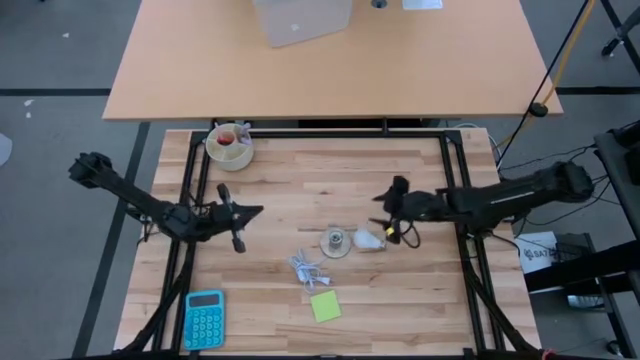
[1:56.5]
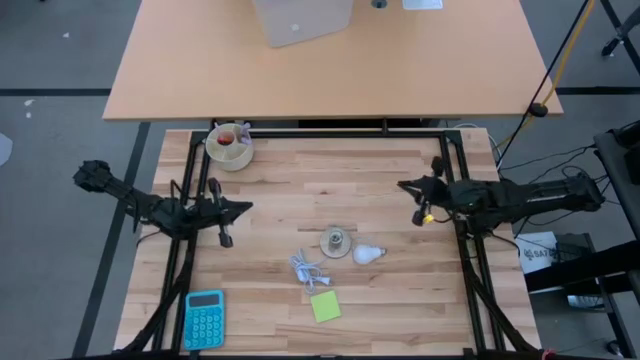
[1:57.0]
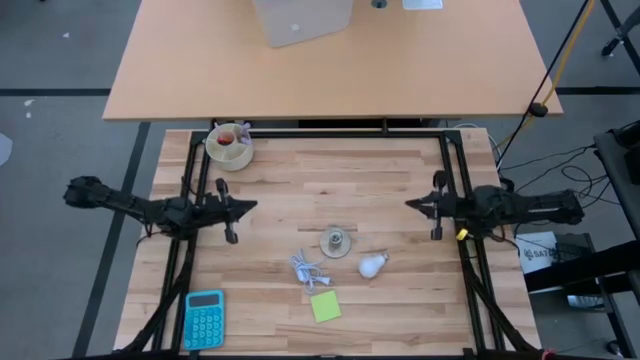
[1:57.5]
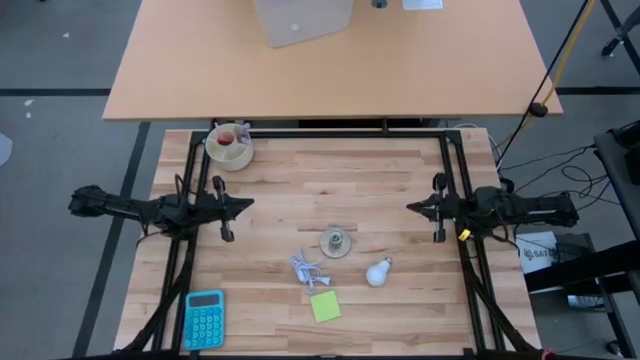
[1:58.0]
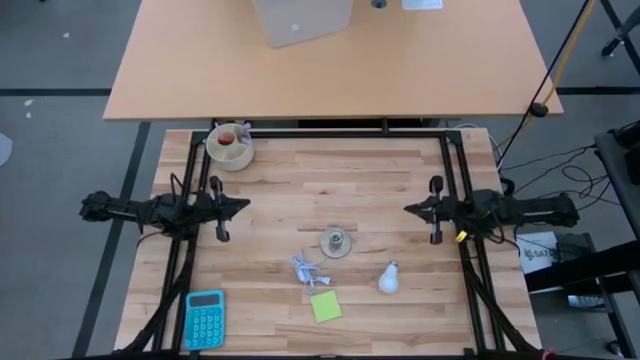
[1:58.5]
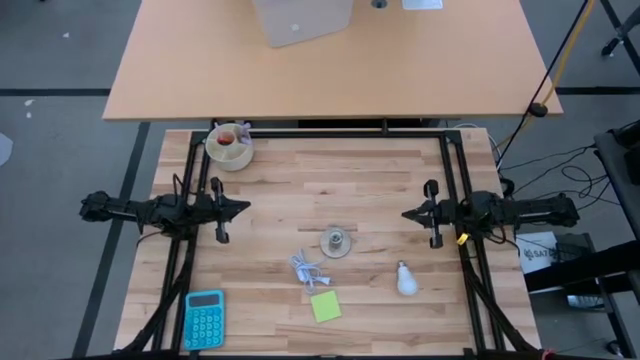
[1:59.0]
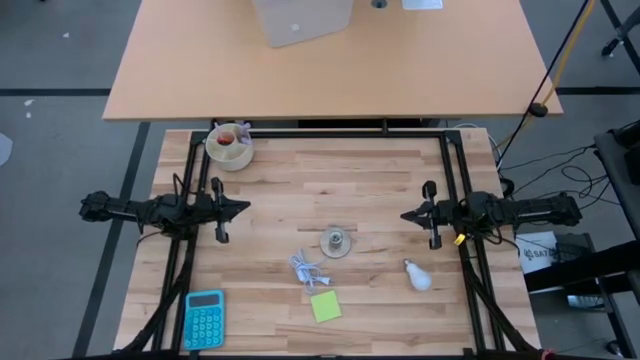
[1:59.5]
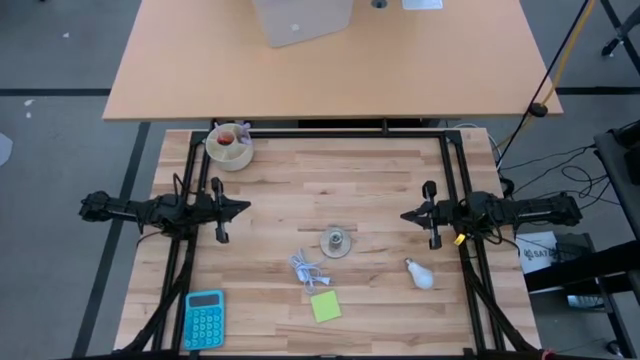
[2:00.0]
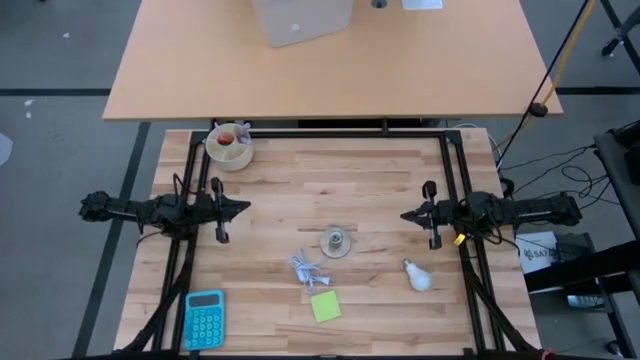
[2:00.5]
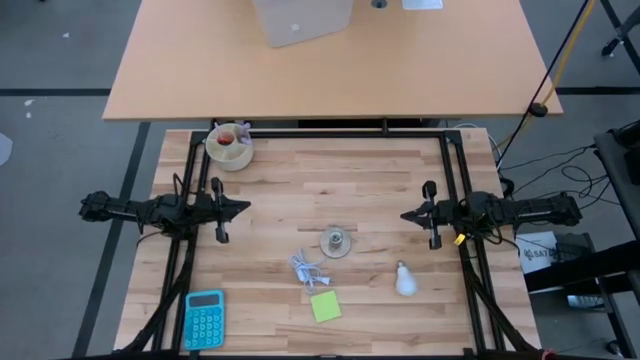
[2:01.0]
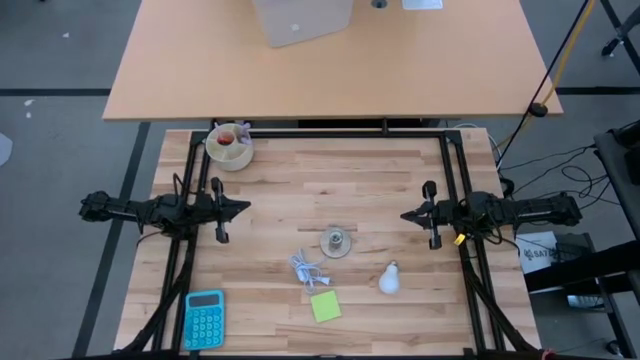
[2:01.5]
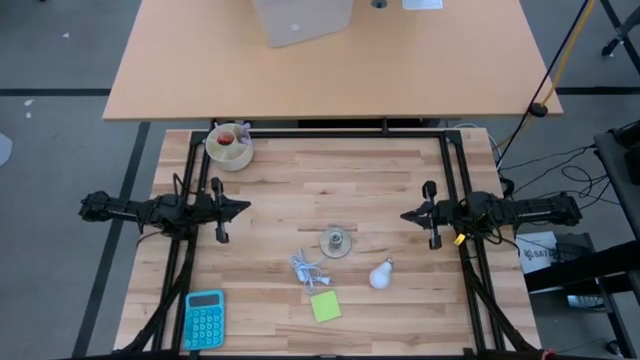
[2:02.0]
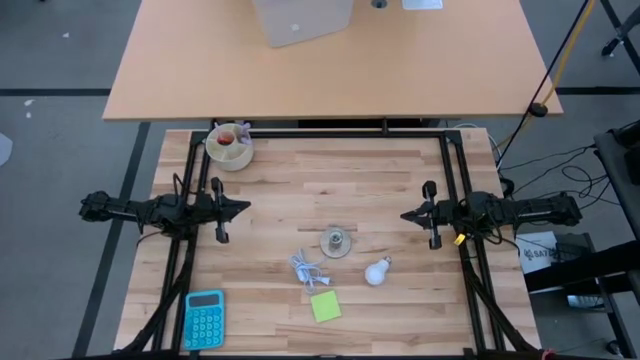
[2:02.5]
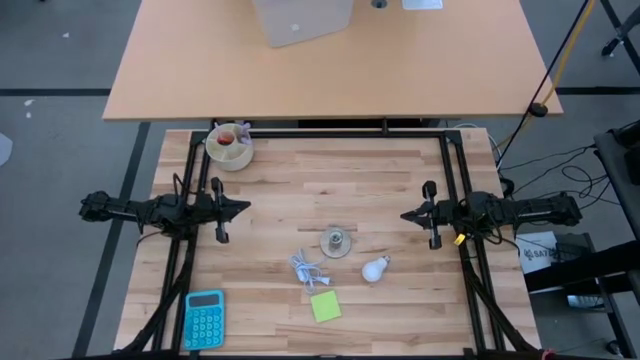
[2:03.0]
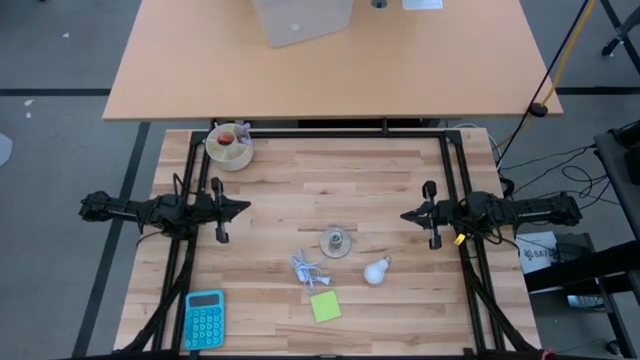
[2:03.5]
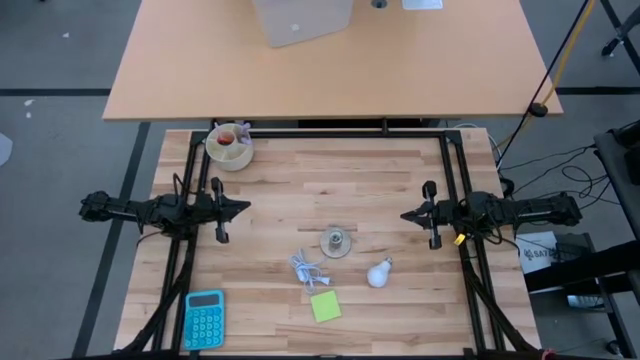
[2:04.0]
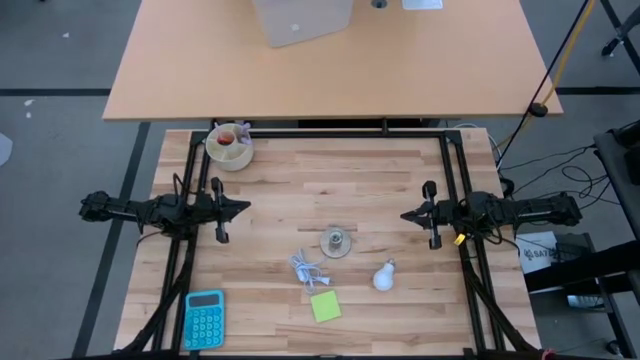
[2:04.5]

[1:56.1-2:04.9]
Task: Screw lightbulb
Return to Home Position

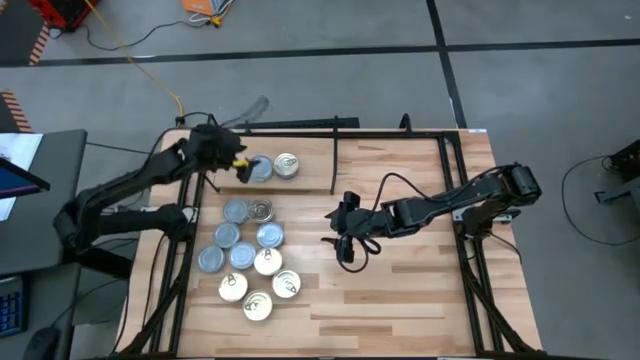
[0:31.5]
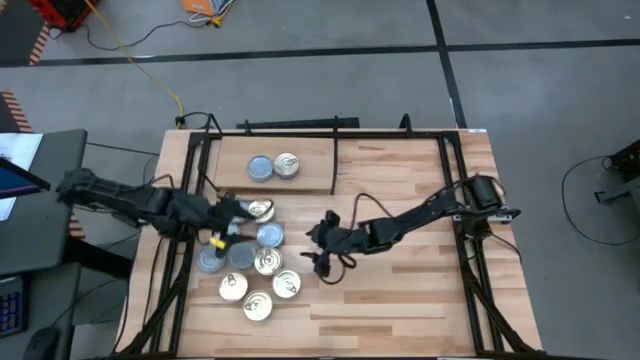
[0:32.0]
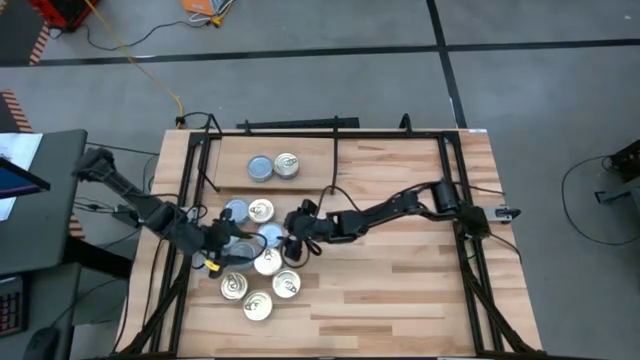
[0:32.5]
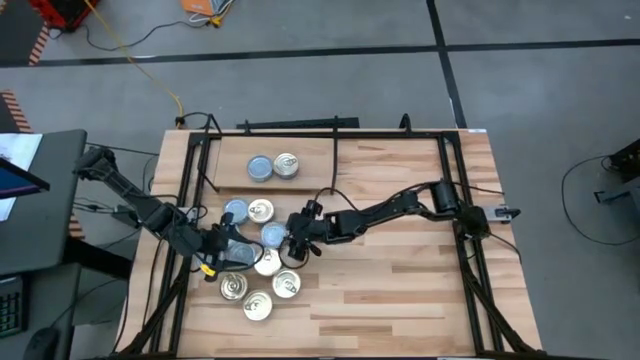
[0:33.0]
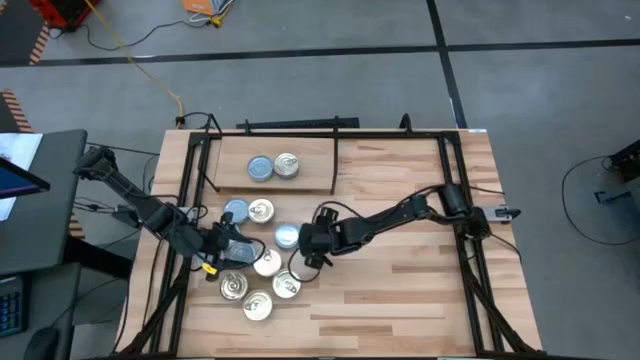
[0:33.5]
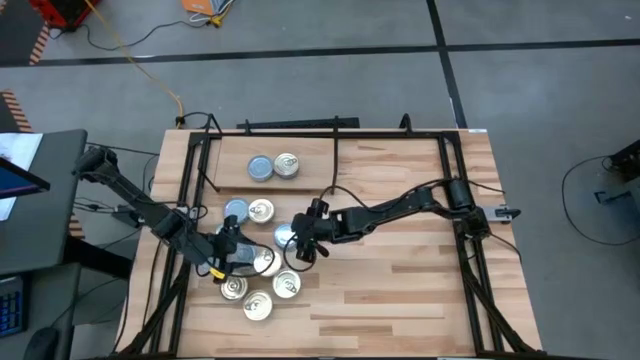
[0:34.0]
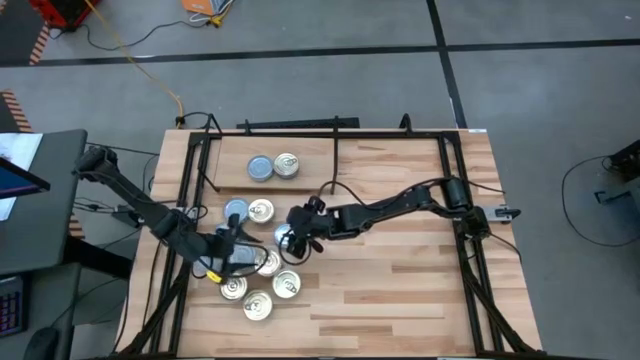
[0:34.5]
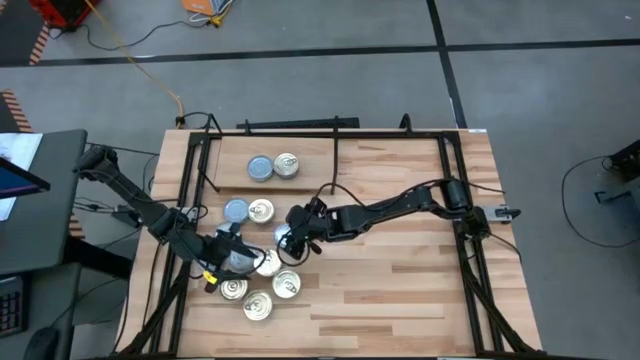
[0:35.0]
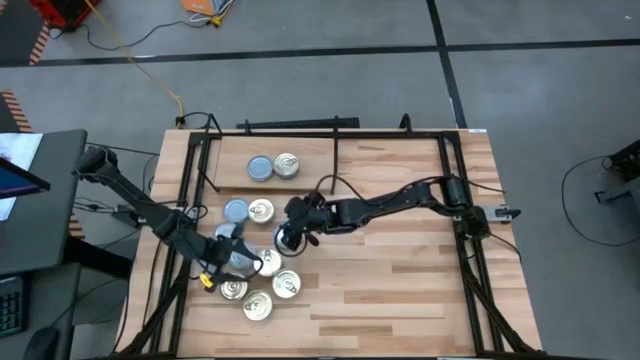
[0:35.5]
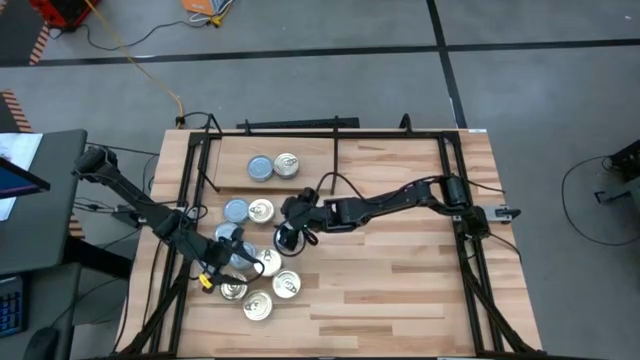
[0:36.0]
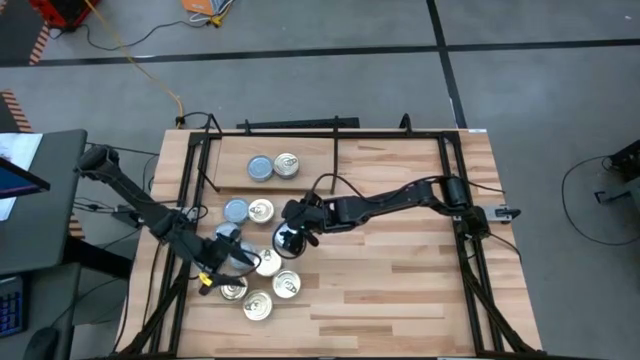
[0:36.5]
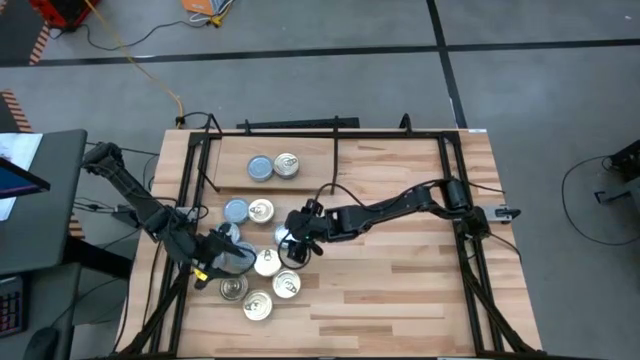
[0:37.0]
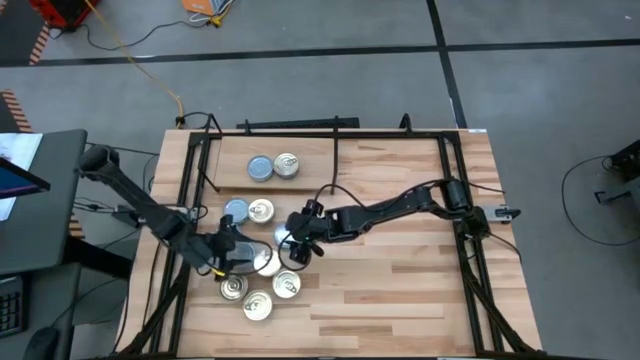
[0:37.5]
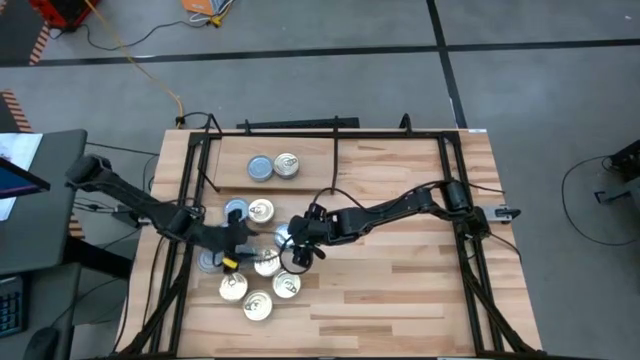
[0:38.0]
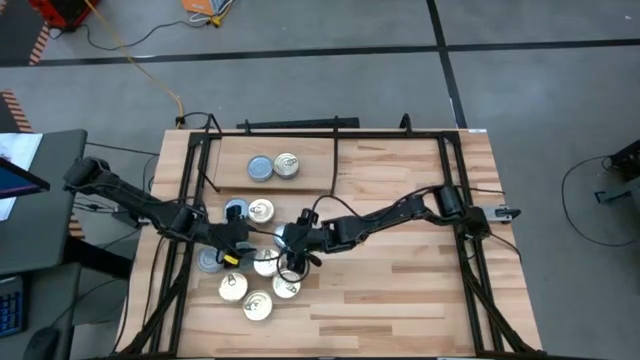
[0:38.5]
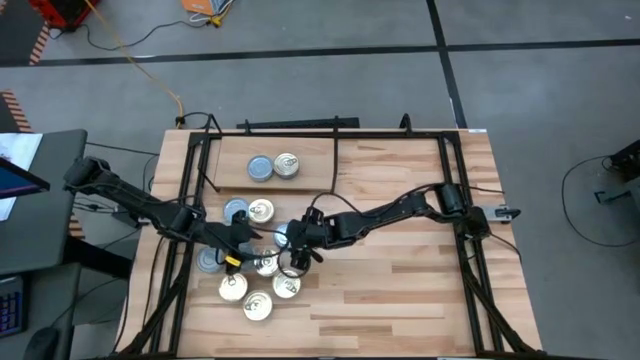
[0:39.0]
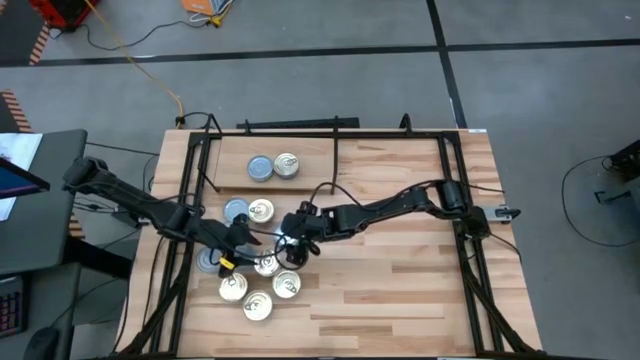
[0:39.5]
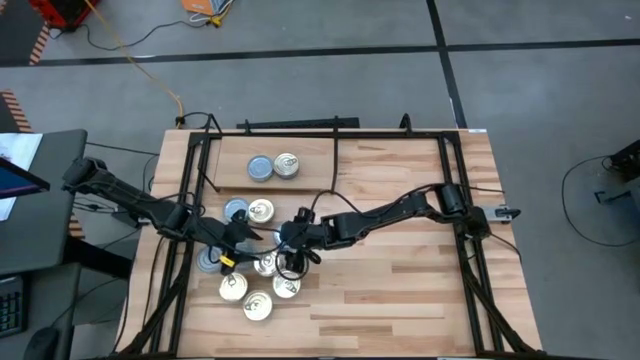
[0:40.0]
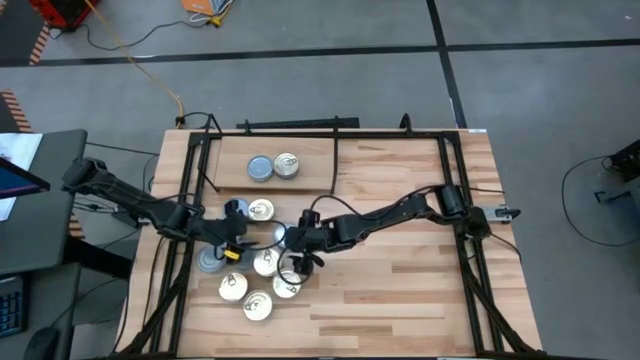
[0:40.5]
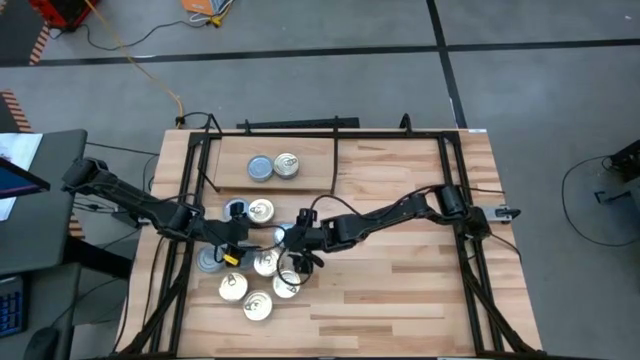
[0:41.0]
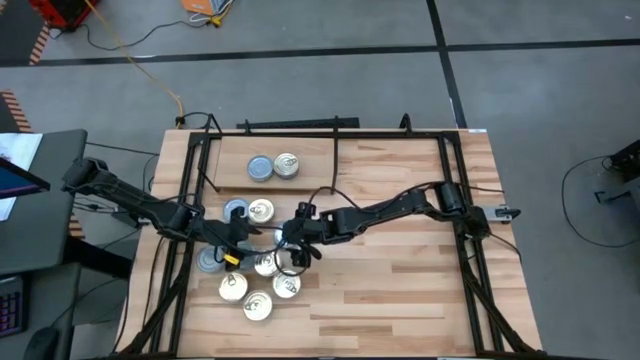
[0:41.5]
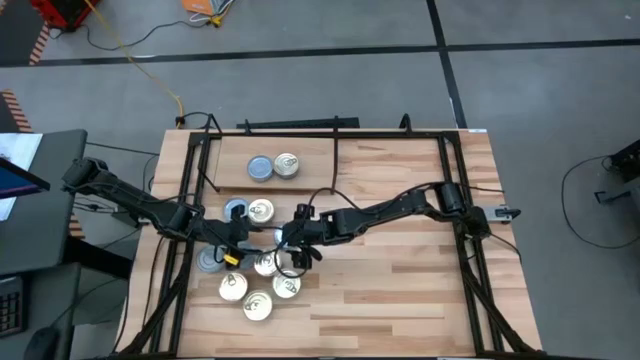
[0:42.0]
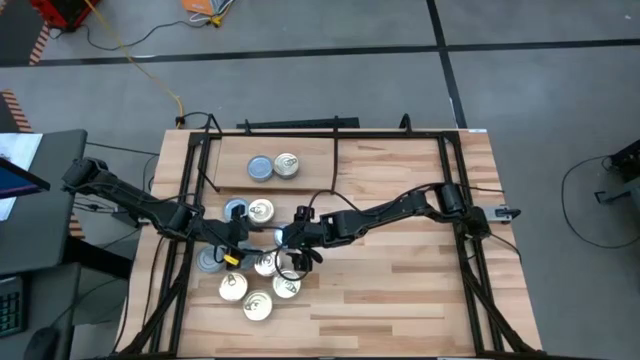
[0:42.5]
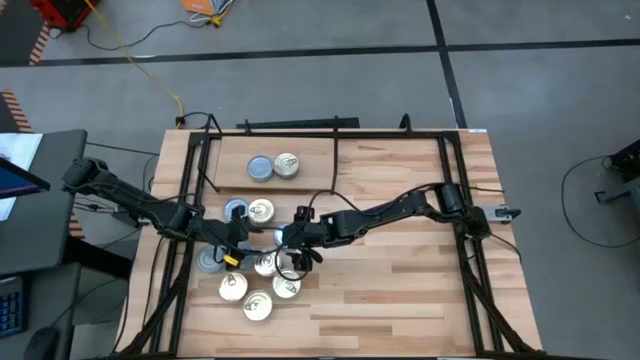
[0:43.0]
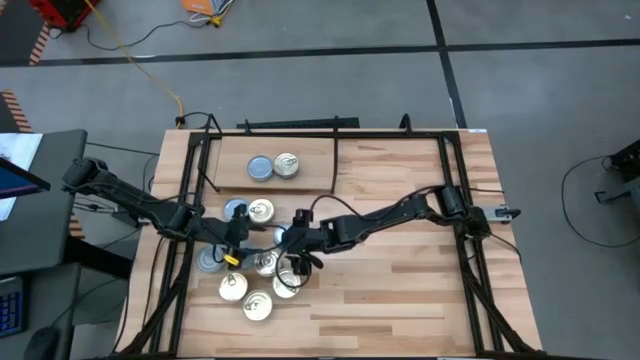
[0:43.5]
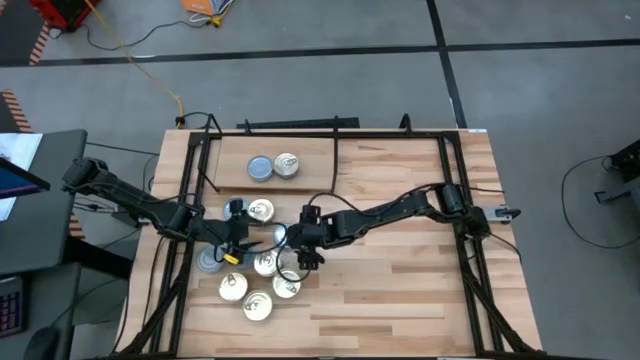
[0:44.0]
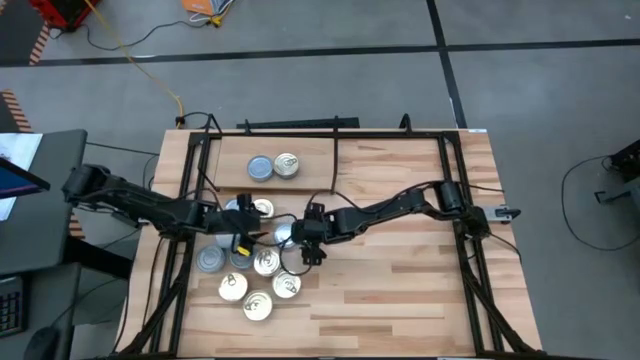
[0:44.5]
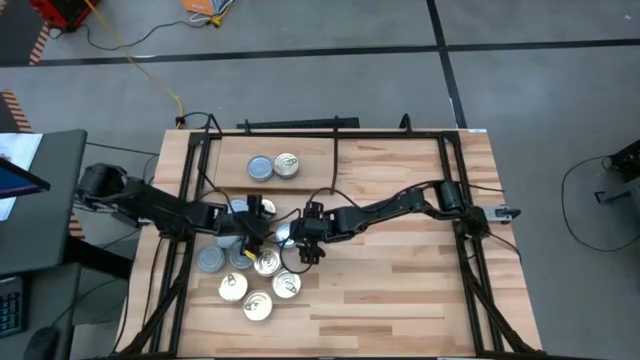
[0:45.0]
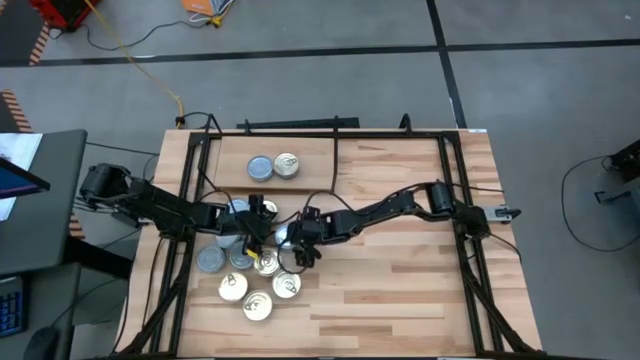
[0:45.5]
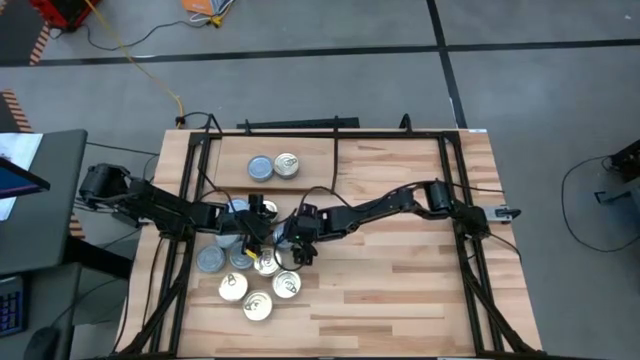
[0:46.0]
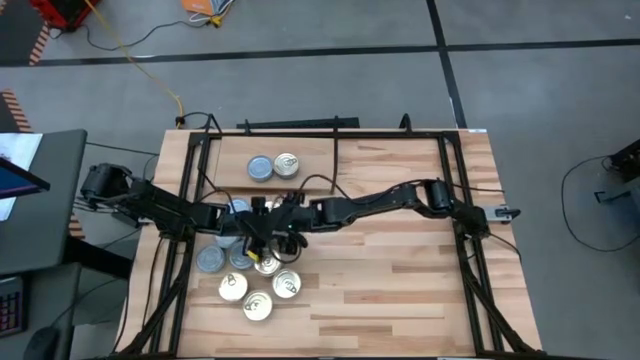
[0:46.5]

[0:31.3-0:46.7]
Task: Stack canned seafood by type on shelf
Stack the green tuna can on top of the green tuna can on the shelf
